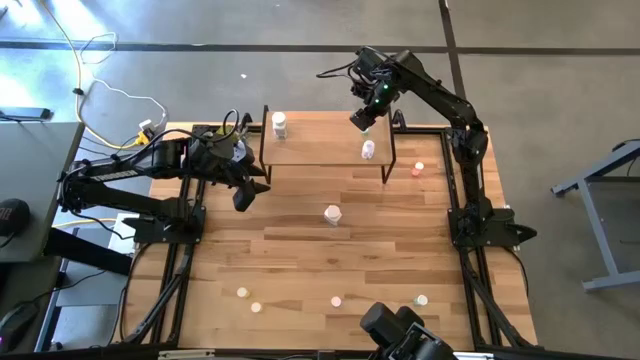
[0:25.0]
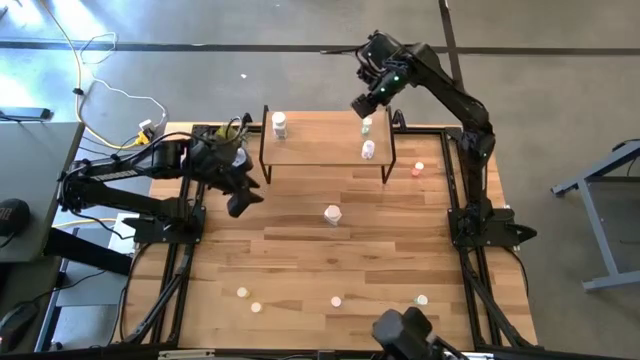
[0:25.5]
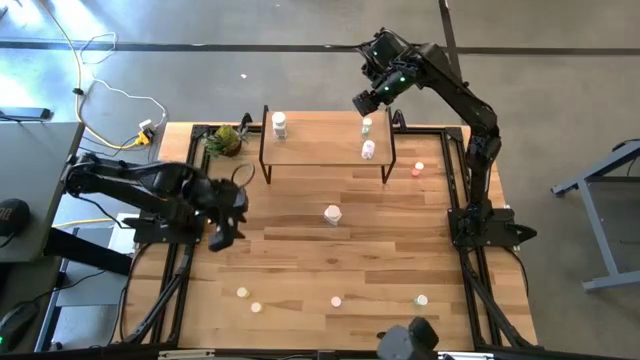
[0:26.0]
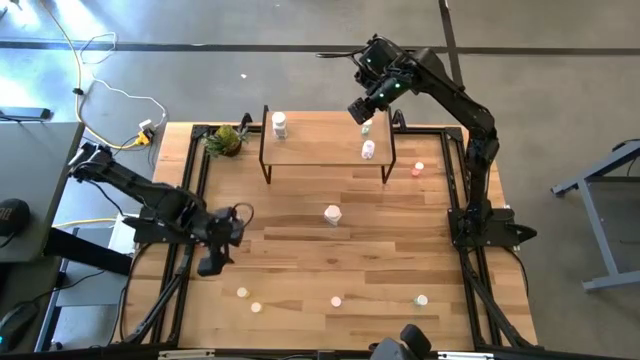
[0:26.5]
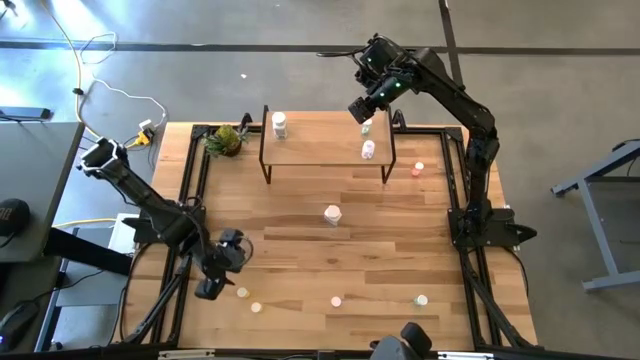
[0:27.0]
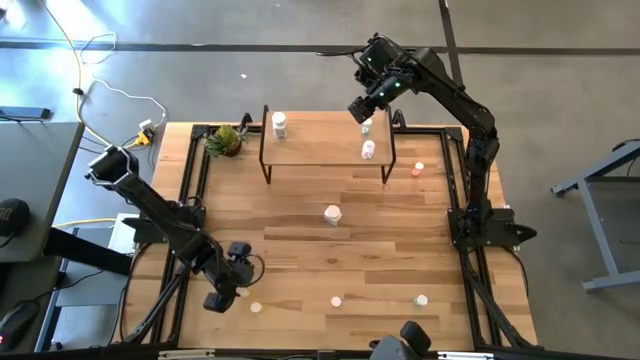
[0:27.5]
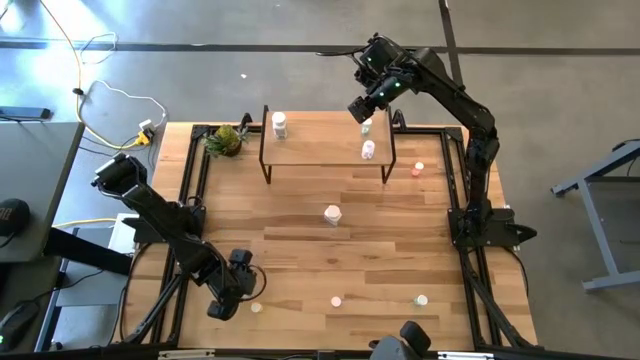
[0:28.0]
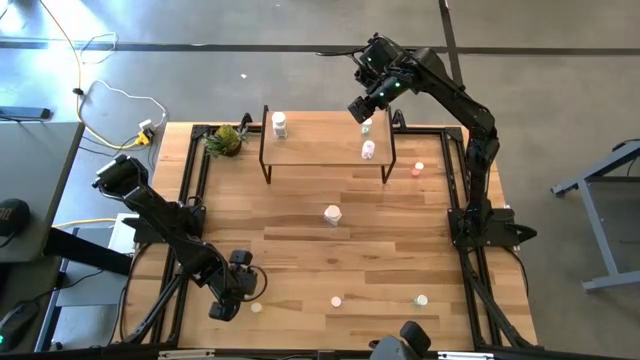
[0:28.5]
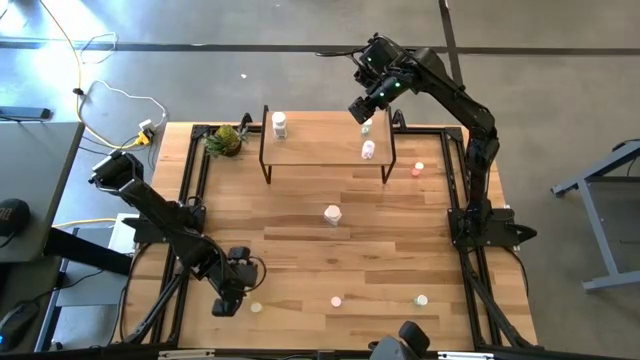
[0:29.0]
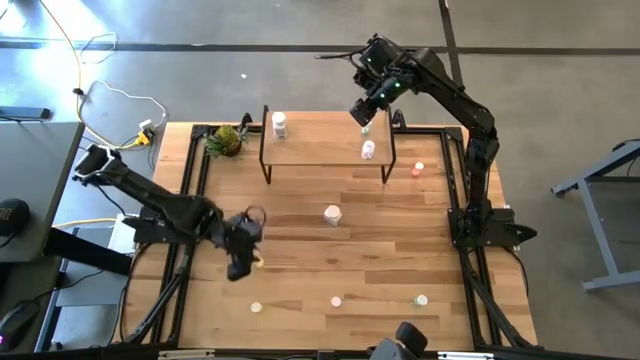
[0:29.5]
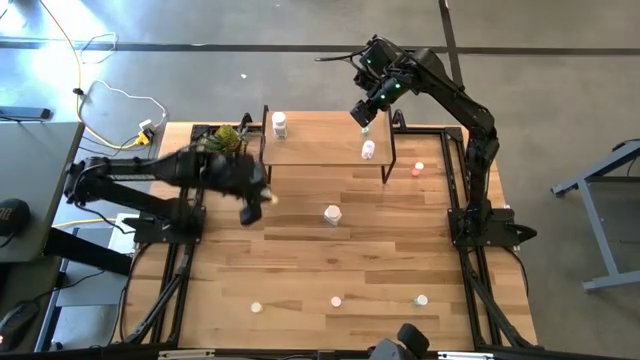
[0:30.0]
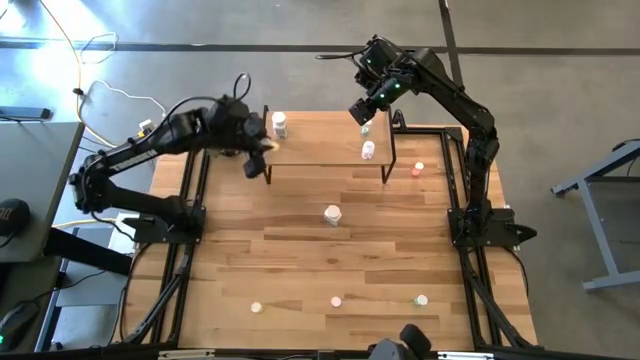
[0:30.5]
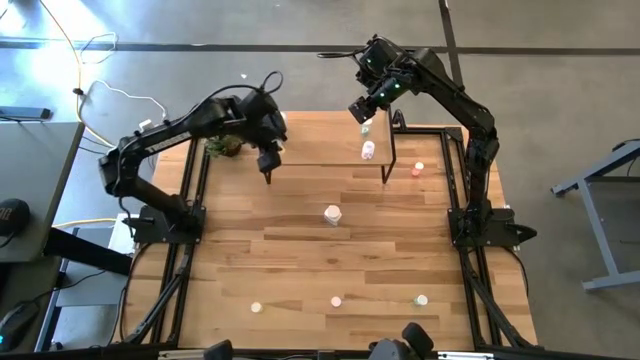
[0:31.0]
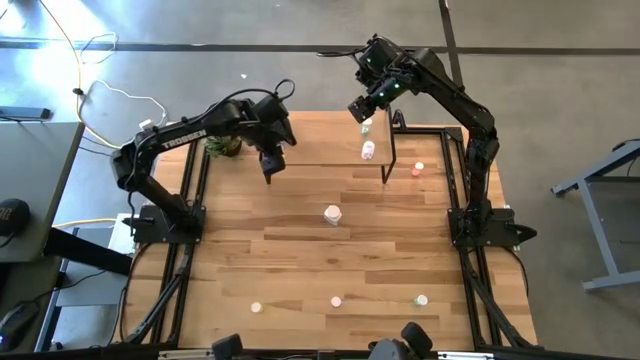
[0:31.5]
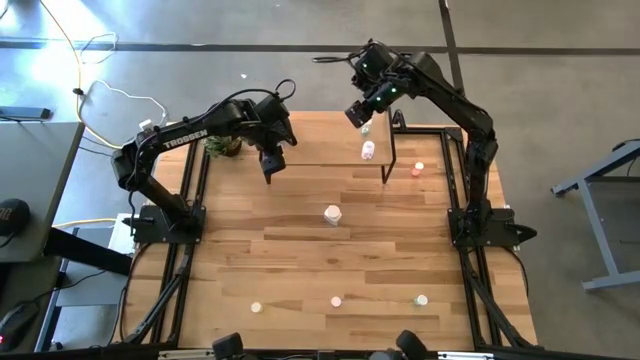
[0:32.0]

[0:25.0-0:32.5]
Task: Pick and place medicine bottles onto shelf by color
Put the top yellow pill bottle on the shelf

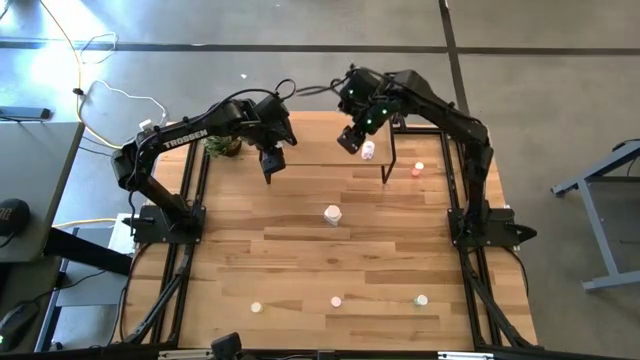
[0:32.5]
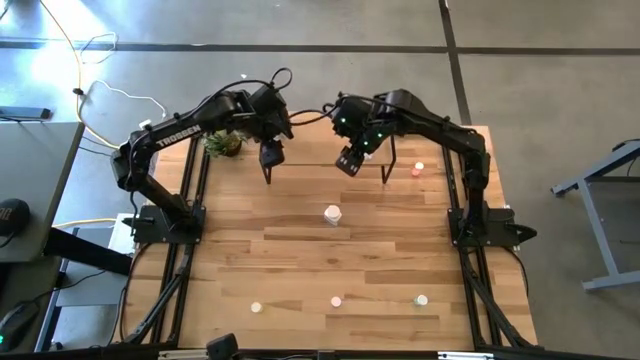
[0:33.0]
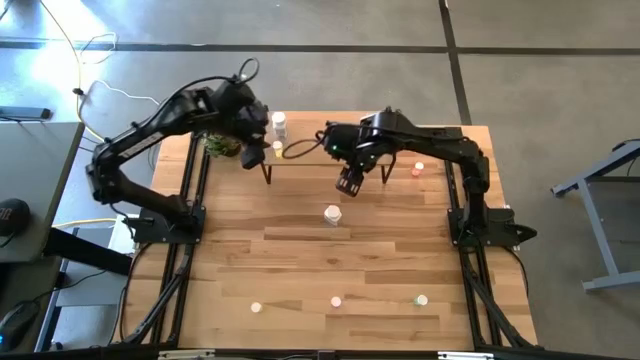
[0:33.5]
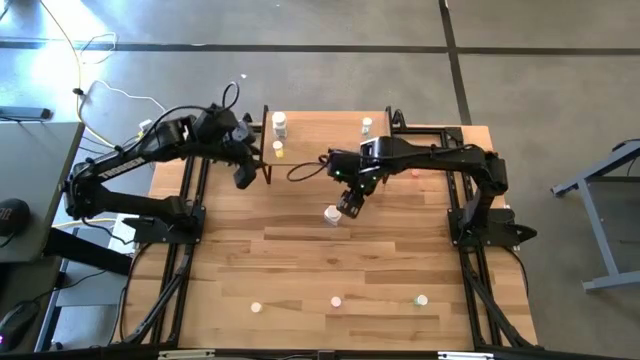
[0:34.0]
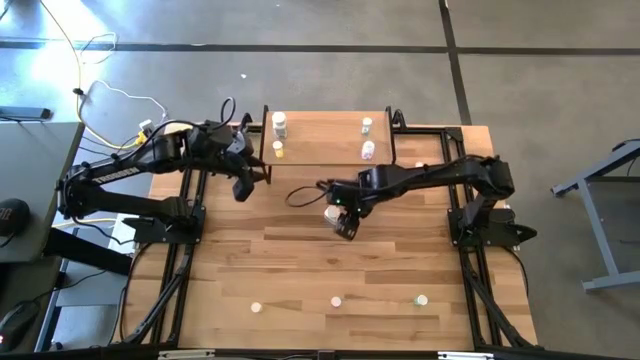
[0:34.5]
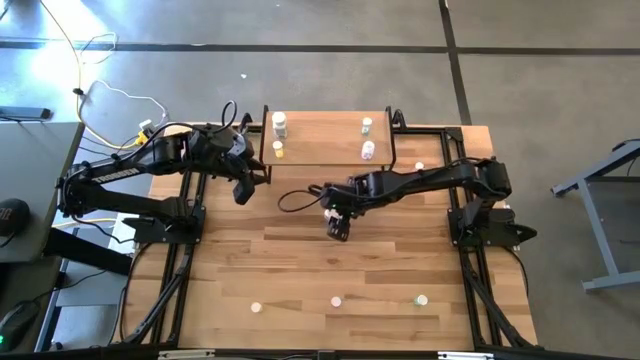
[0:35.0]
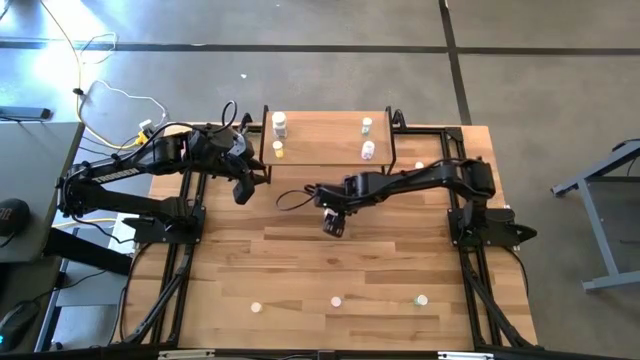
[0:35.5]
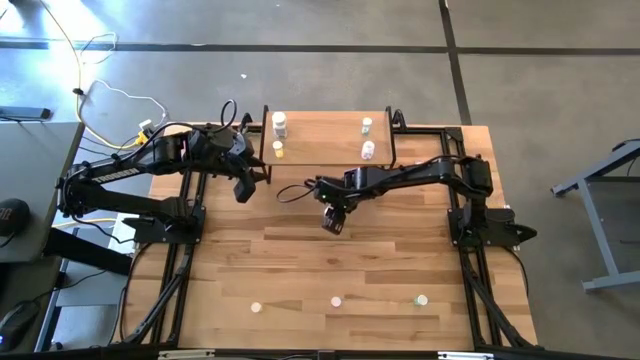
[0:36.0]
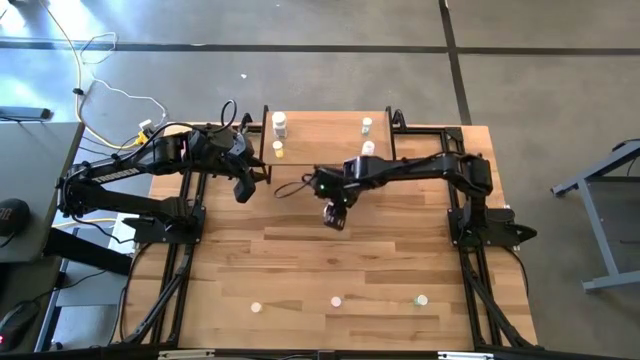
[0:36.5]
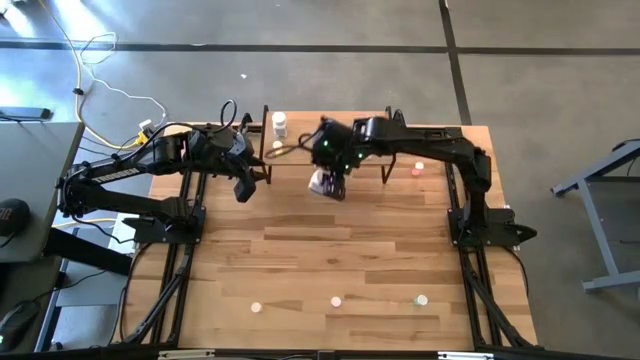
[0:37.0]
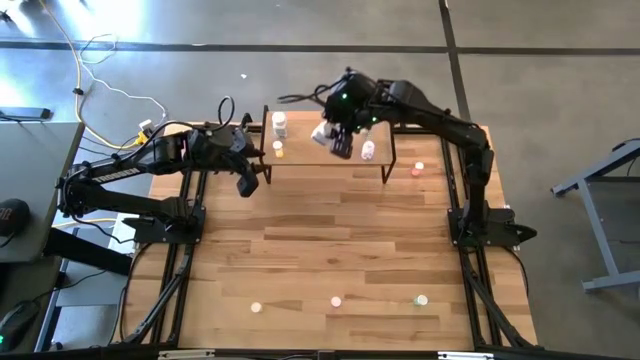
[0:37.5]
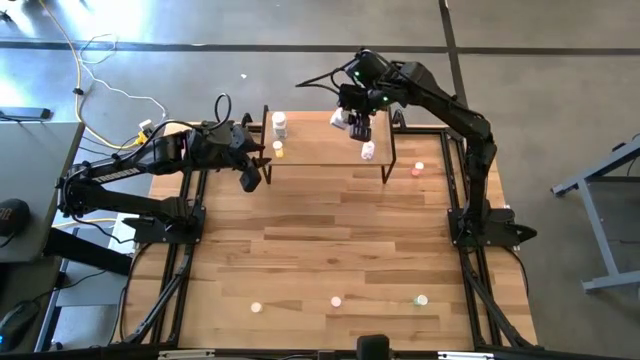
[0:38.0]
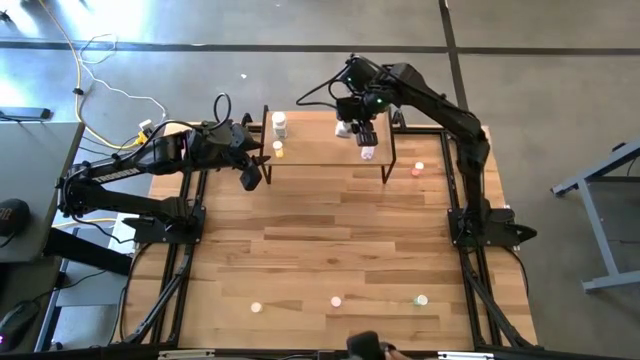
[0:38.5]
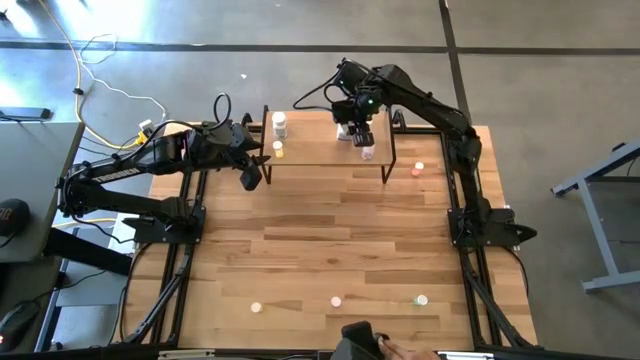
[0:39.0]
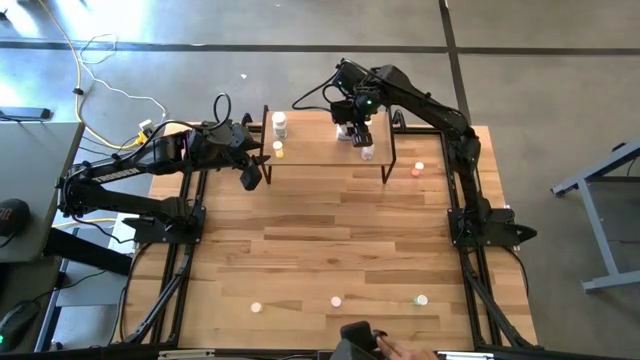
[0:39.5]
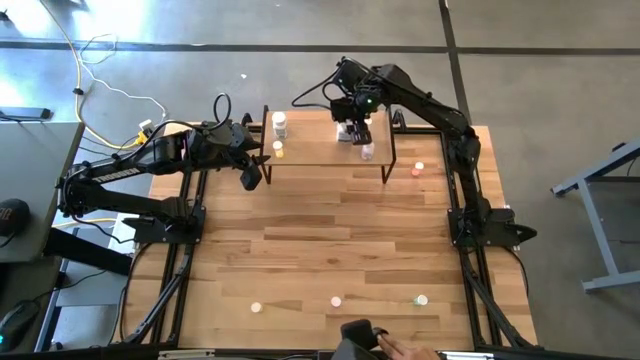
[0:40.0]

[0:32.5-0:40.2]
Put the white pill bottle on the shelf

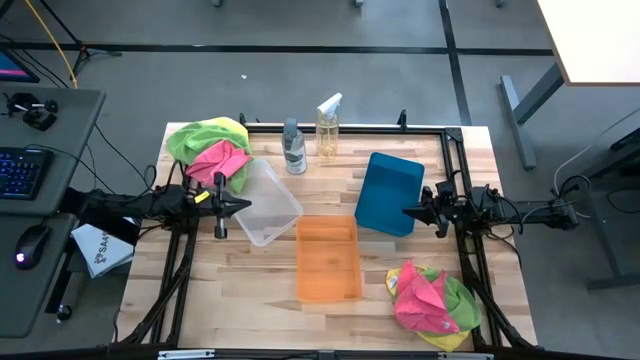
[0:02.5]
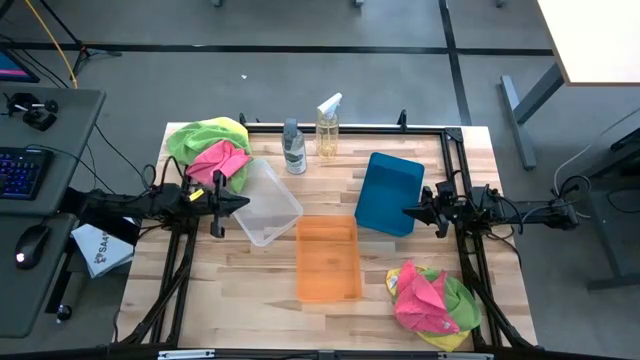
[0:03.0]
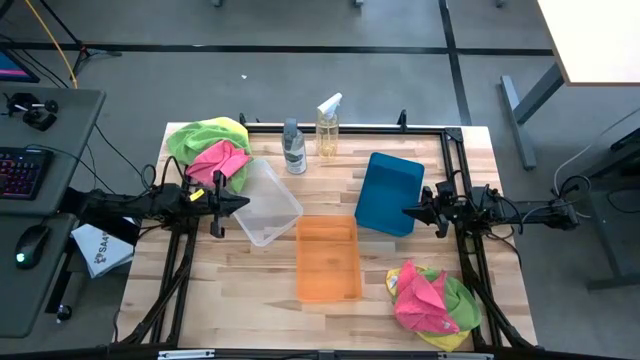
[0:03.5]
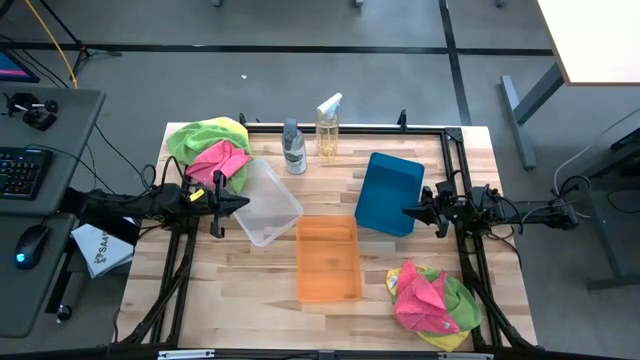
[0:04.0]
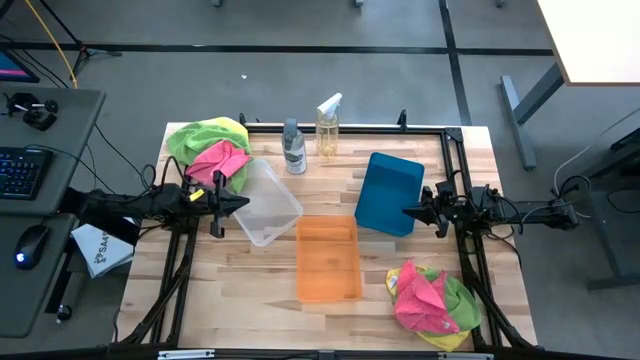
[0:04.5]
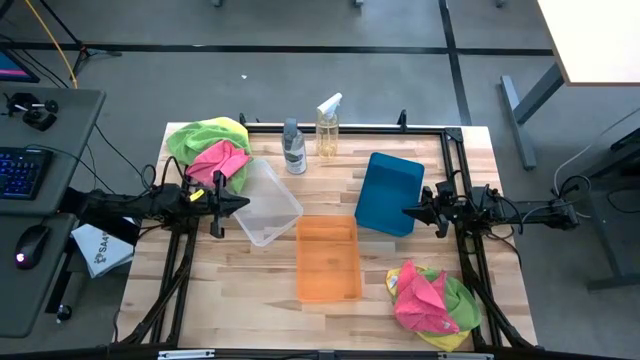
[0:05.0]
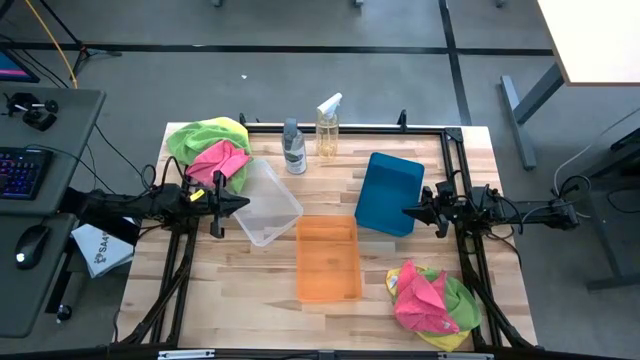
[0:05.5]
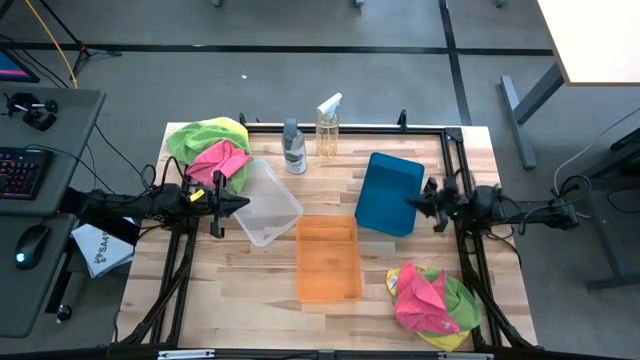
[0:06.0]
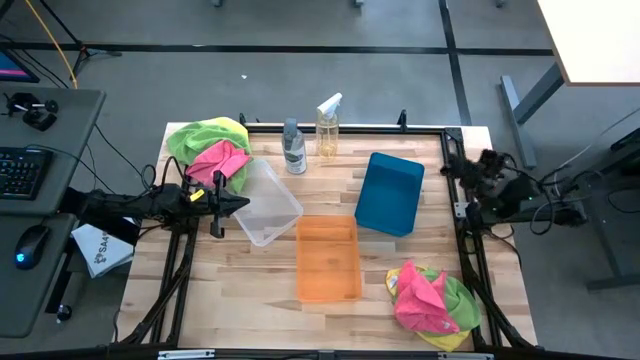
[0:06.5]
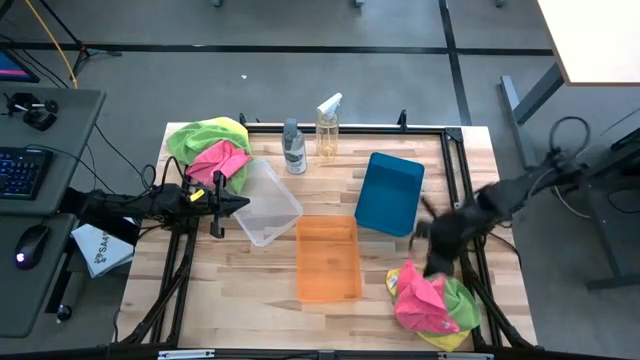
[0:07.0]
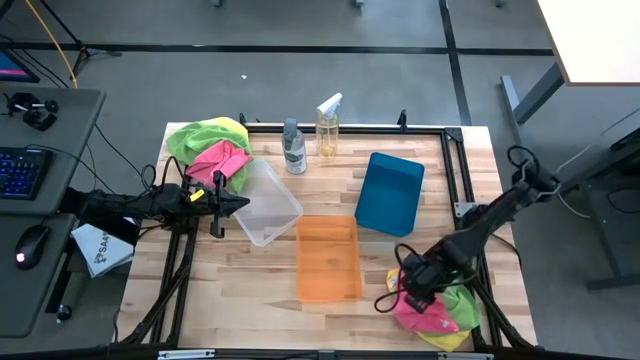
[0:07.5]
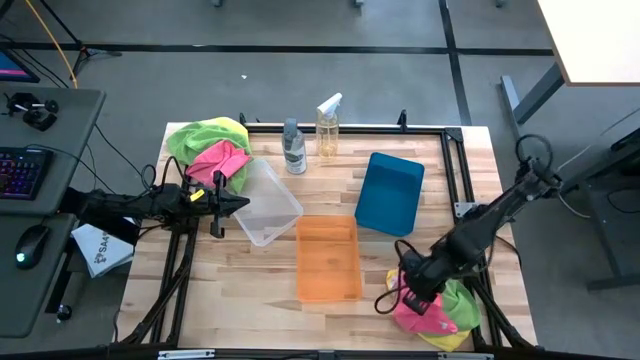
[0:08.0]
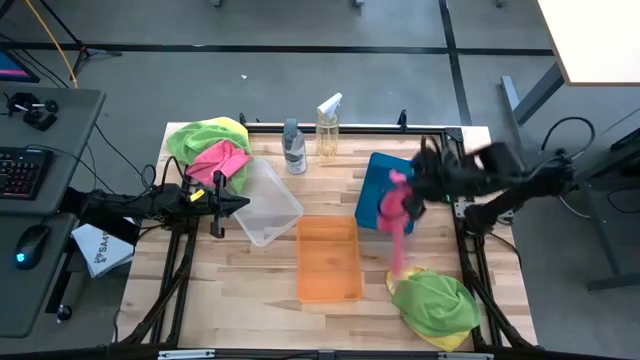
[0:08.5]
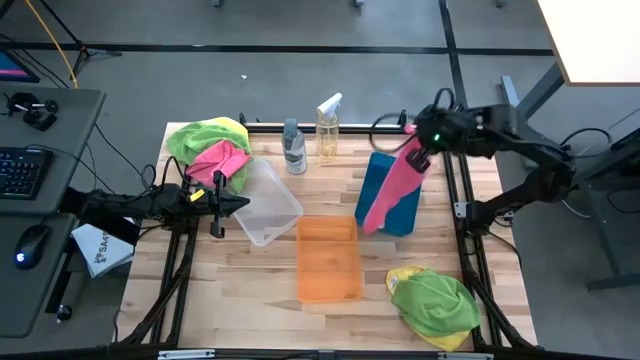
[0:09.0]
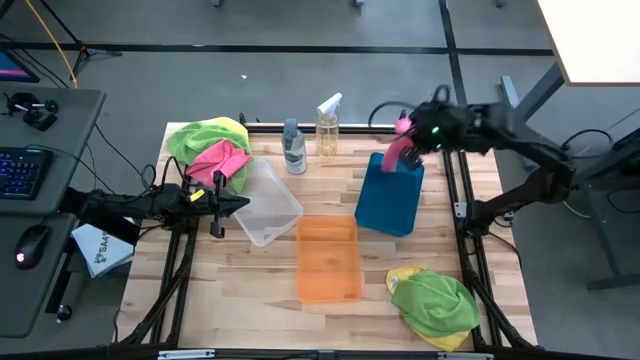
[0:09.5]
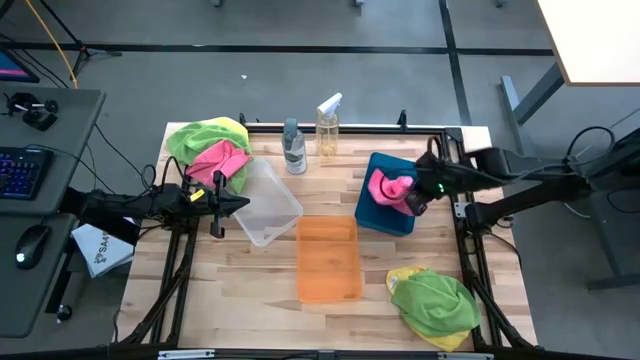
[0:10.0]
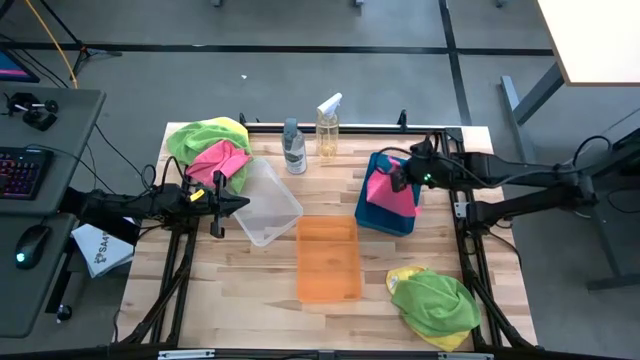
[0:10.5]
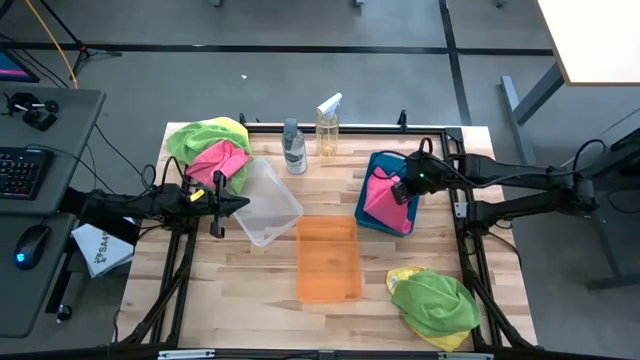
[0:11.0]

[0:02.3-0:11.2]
Task: Sort microfiber towel by color & place in baskets
Put the pink microfiber towel into the blue bin
